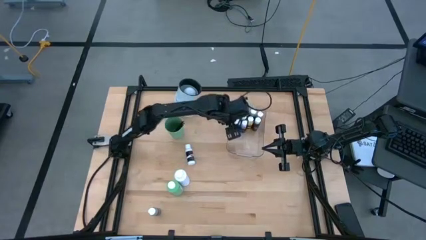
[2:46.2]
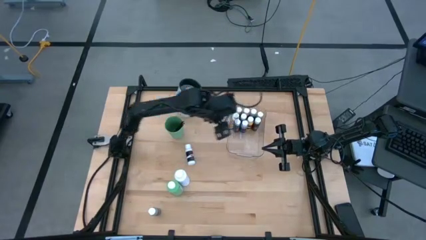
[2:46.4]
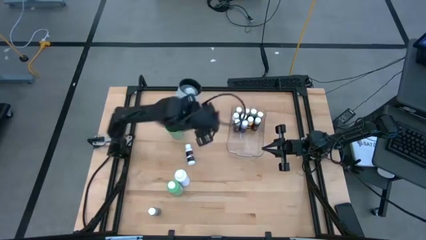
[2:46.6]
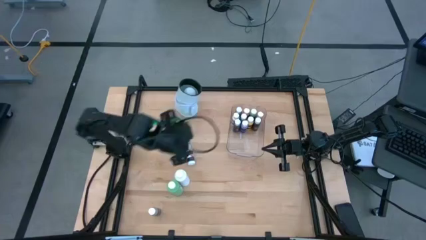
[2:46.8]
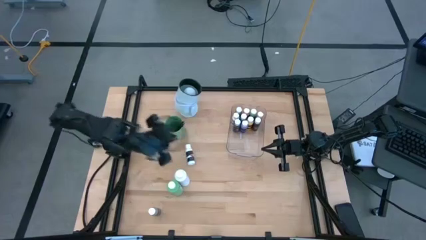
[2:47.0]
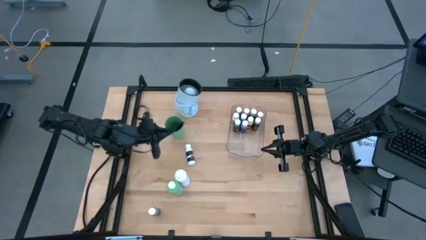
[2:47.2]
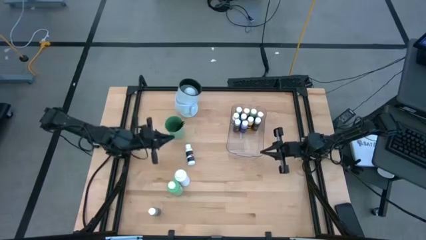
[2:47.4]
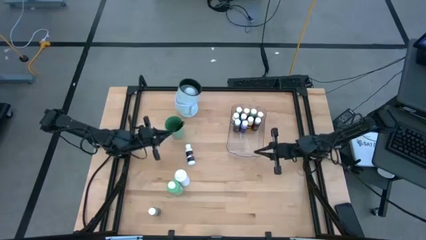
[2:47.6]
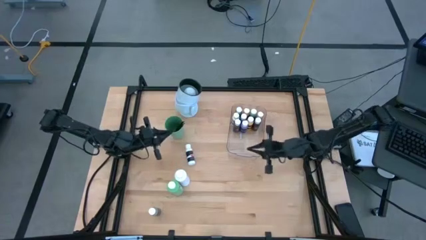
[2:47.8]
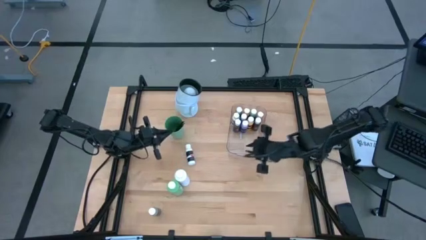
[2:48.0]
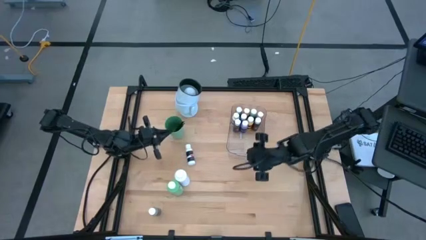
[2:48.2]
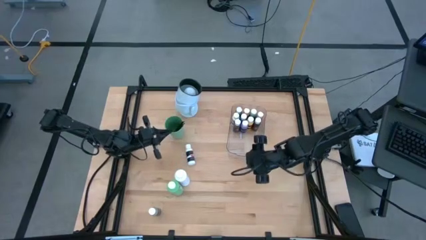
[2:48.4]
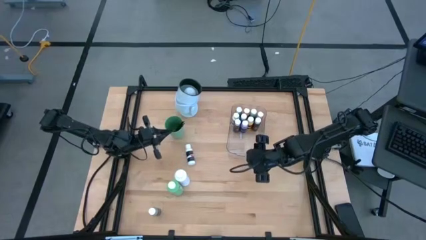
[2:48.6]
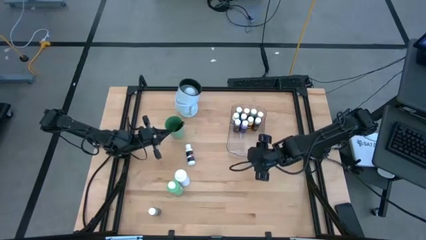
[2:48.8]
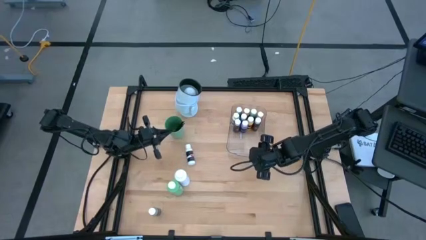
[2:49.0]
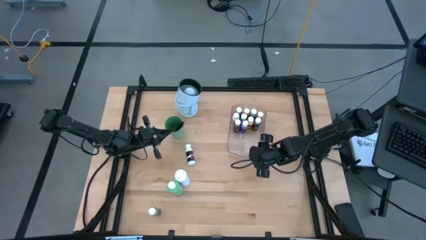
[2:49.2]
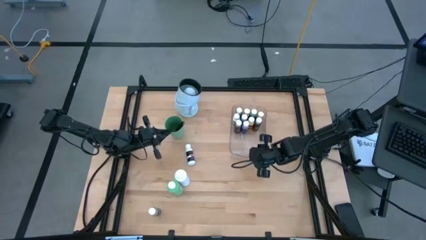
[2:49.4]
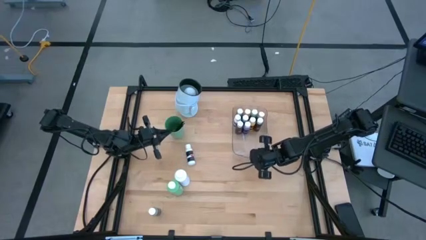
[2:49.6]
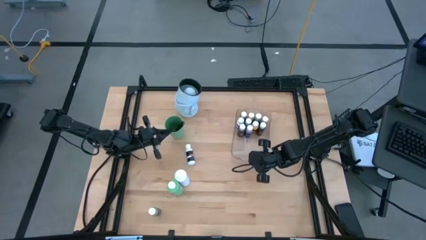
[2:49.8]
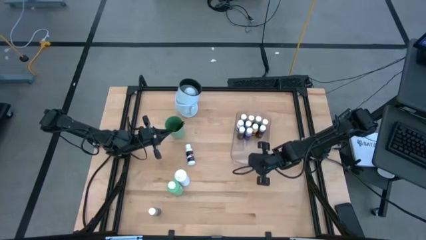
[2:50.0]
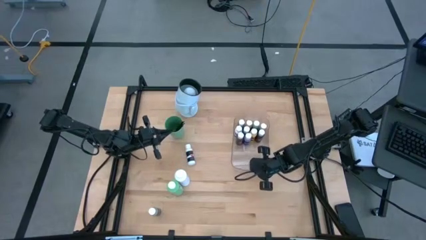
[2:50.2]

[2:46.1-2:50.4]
Task: Pick & Place Paint Supplies
Adjust the transparent bin

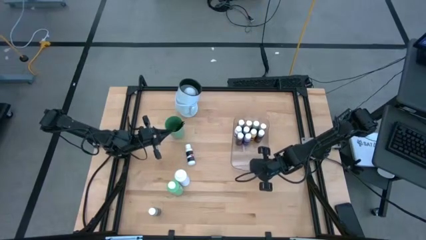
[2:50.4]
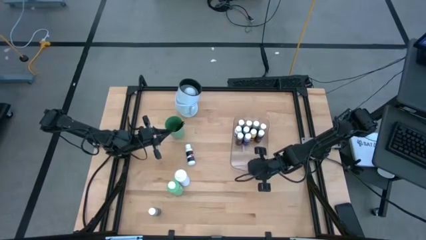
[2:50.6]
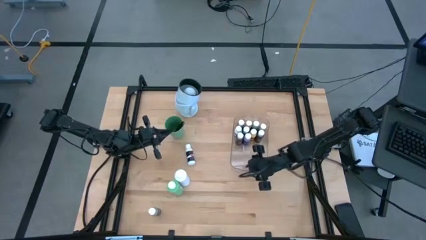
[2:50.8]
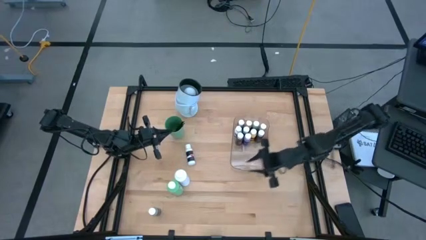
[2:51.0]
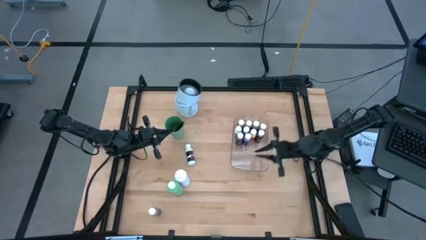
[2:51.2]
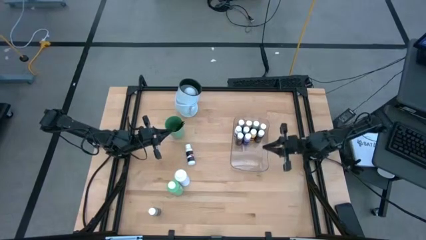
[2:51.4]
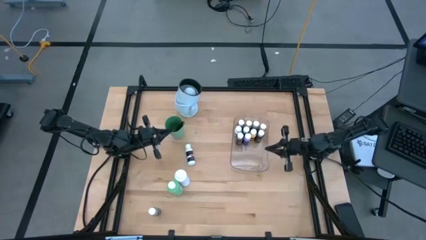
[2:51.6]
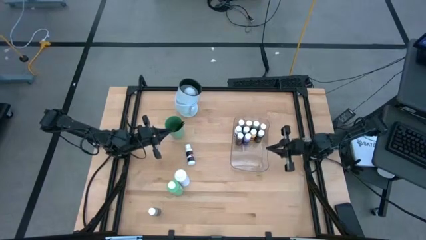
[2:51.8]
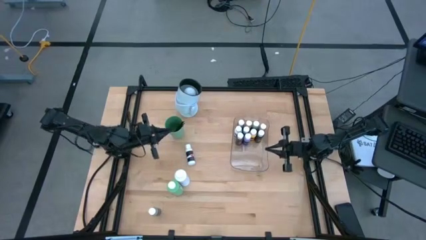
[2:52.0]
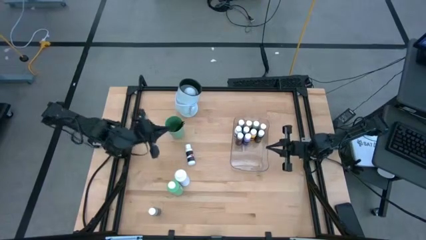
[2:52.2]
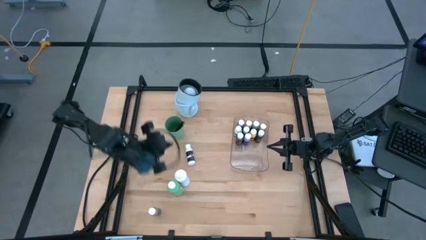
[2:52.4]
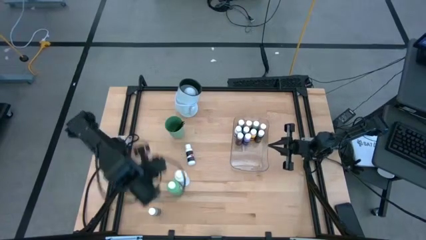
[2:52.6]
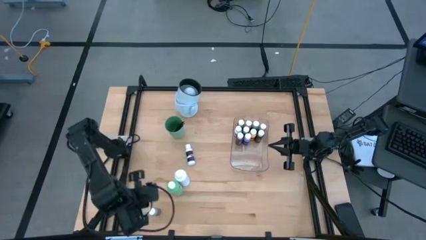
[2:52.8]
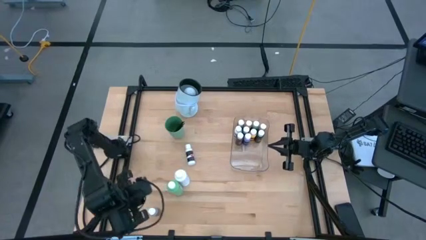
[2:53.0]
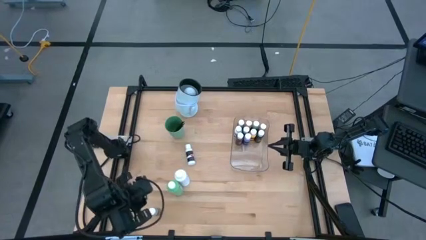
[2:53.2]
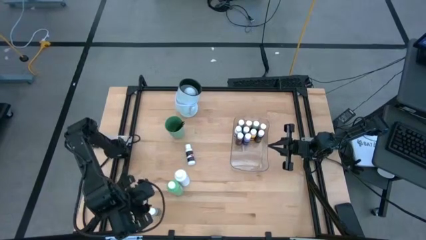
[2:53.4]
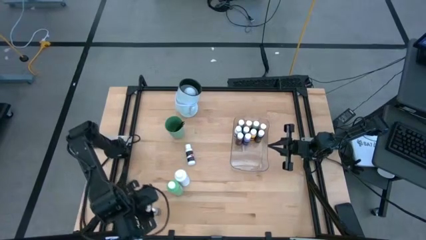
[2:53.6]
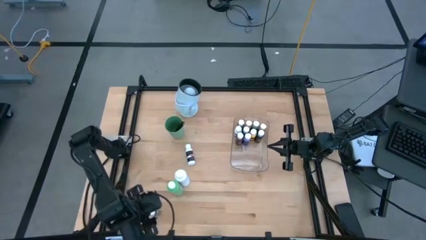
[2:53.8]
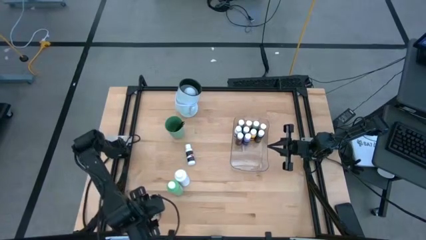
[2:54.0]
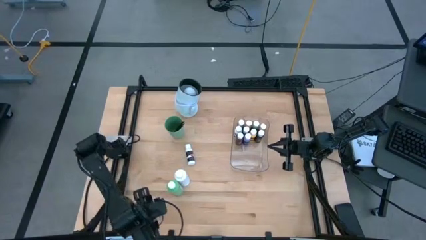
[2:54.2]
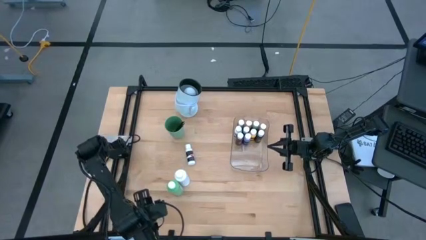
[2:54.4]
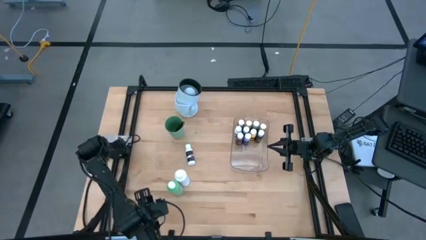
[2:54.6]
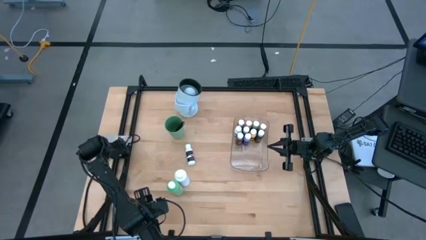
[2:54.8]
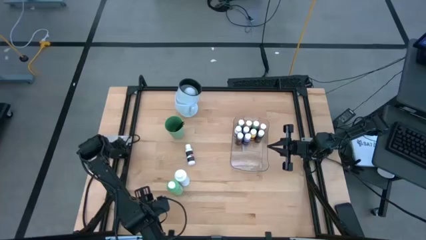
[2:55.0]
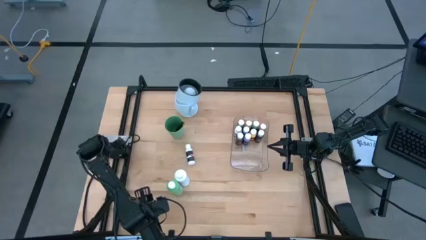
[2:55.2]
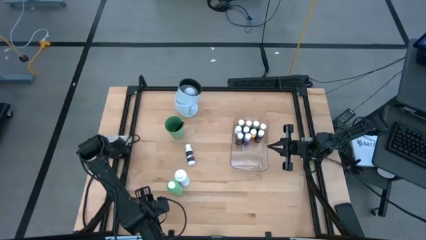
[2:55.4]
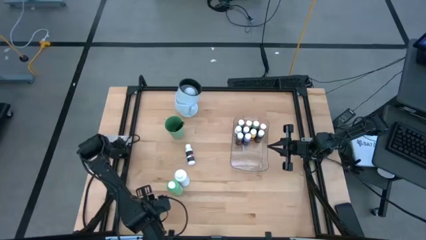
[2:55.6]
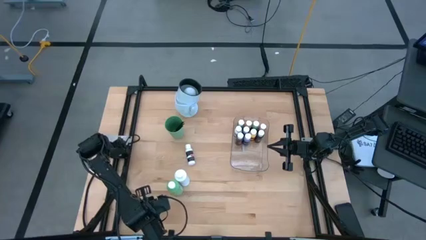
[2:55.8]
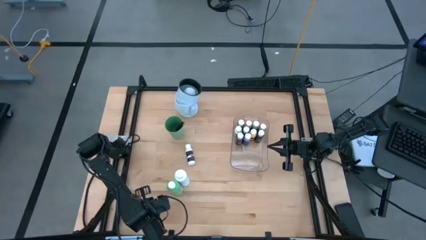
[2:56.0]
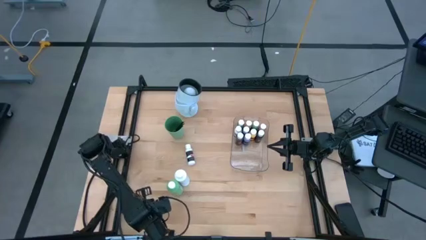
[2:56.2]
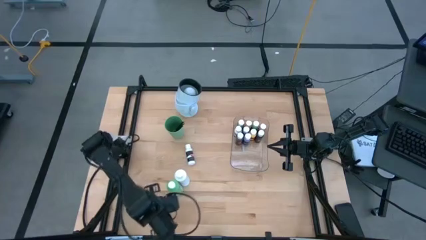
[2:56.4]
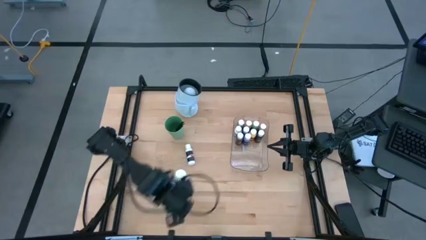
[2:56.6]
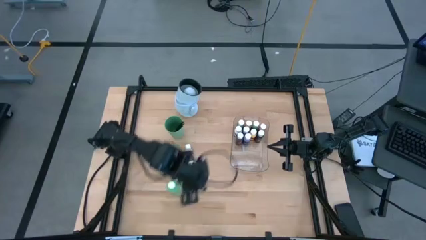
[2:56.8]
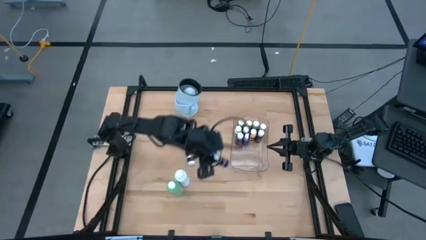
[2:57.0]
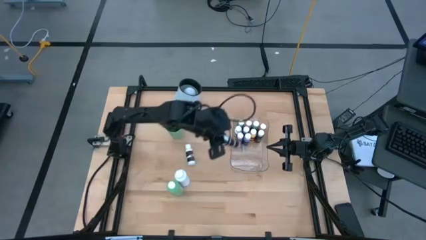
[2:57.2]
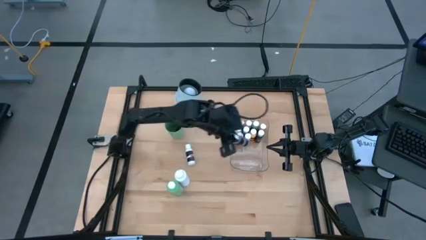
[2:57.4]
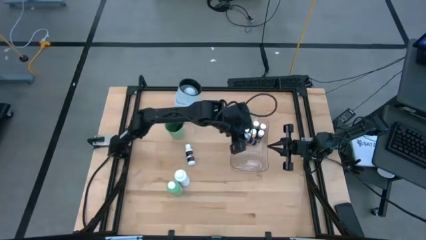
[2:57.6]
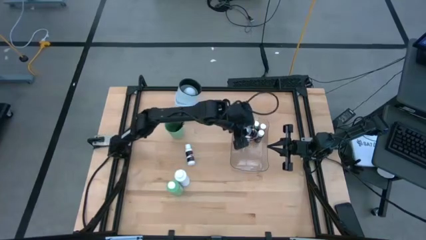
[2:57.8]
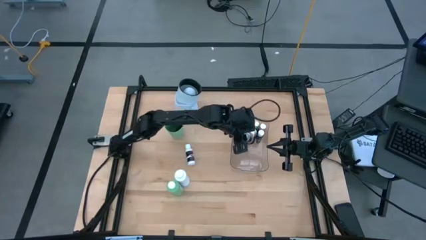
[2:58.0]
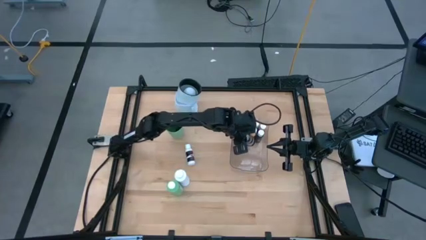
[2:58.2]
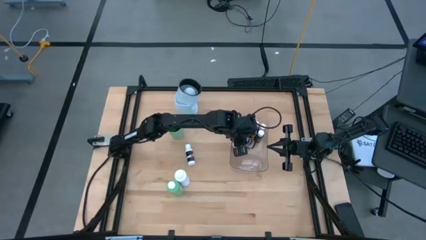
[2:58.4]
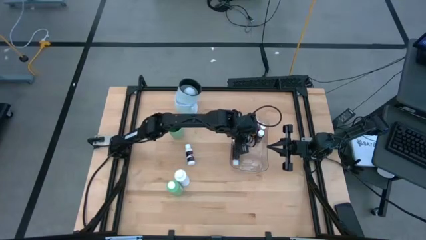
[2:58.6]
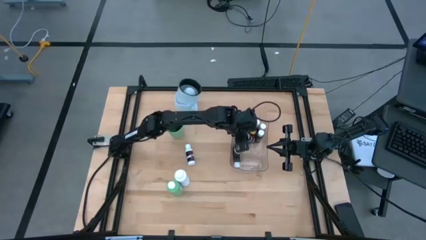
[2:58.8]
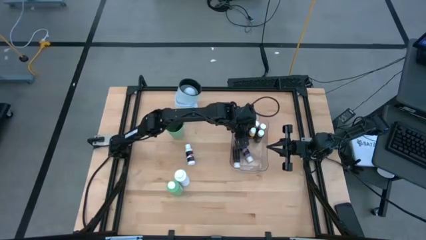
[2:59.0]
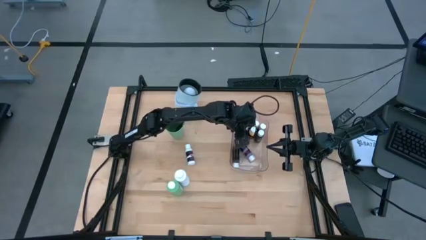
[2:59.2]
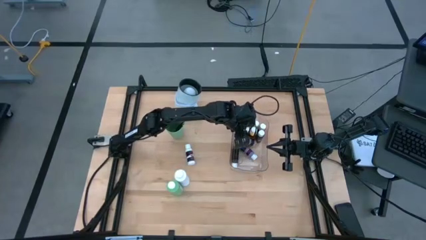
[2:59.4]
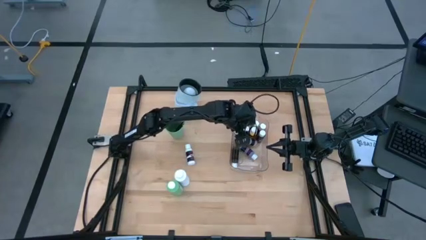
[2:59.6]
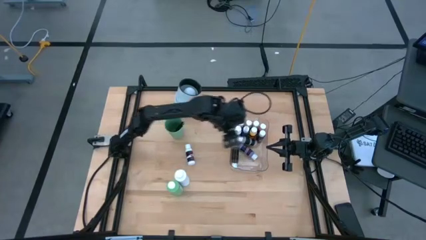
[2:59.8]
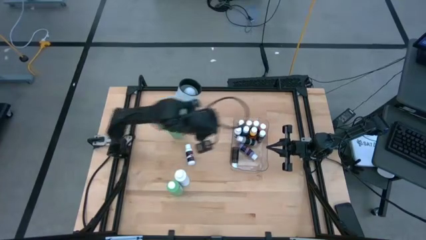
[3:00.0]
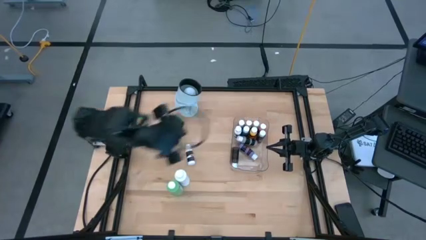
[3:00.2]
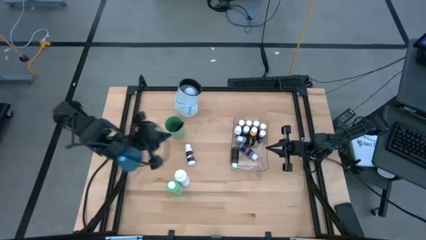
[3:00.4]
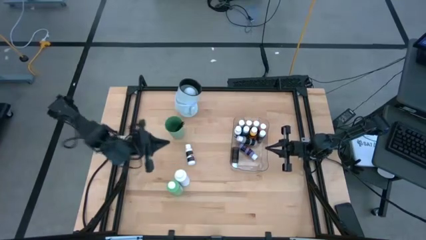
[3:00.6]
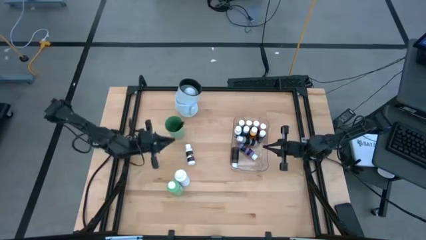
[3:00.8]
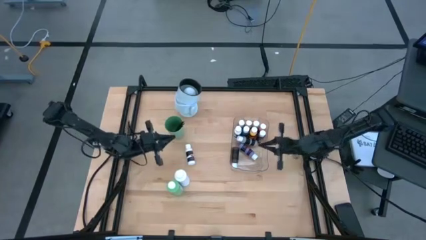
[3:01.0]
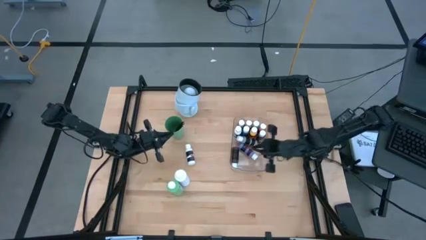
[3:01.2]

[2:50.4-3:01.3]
Put the gray paint bottle into the transparent bin
